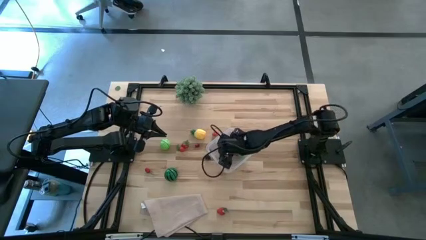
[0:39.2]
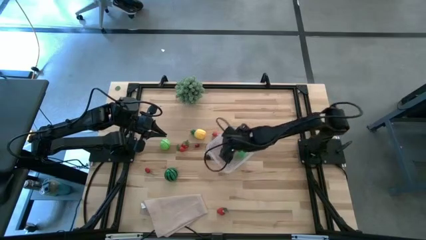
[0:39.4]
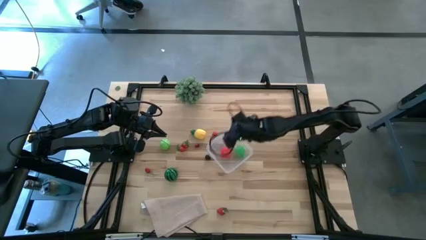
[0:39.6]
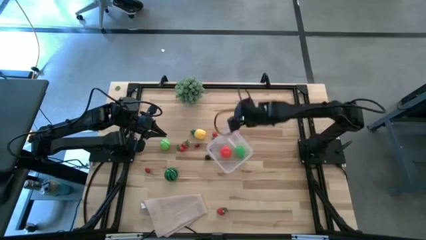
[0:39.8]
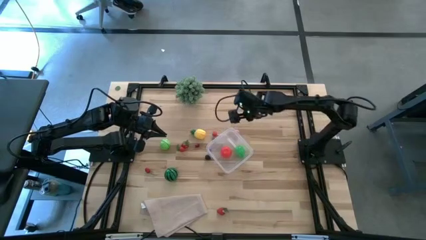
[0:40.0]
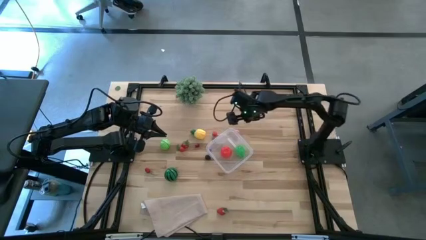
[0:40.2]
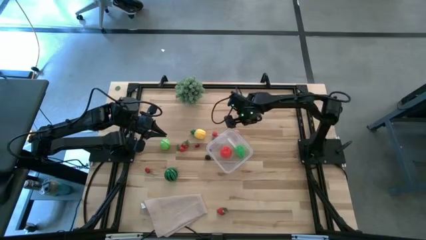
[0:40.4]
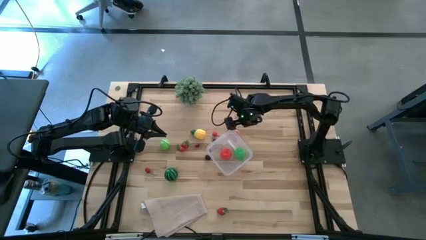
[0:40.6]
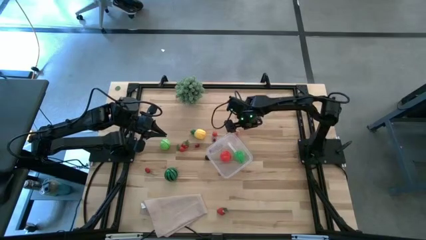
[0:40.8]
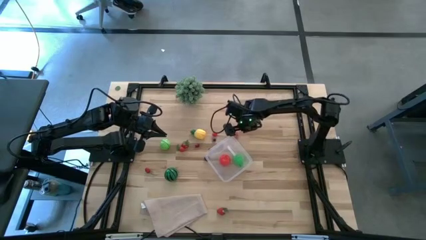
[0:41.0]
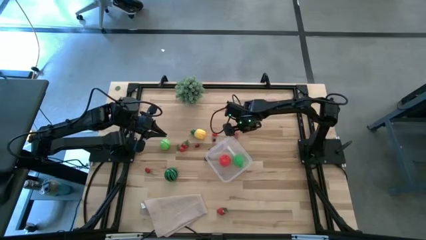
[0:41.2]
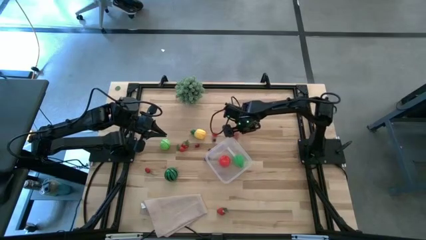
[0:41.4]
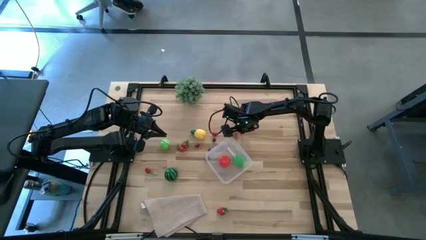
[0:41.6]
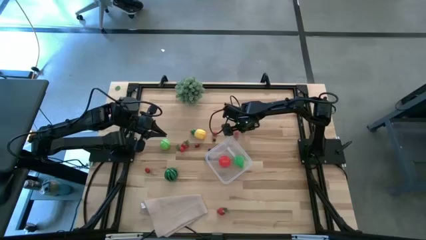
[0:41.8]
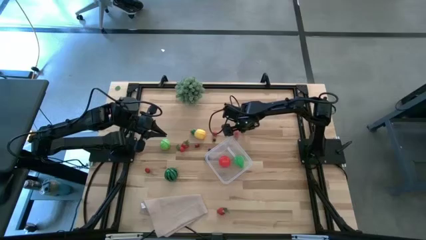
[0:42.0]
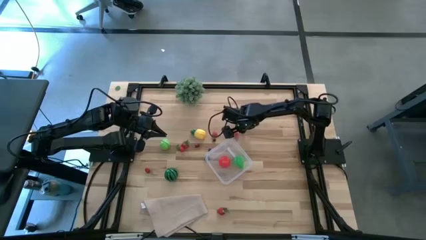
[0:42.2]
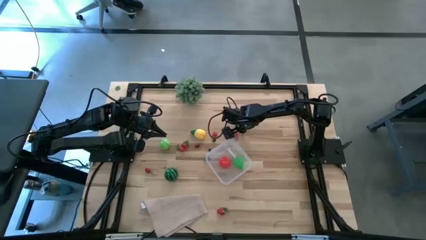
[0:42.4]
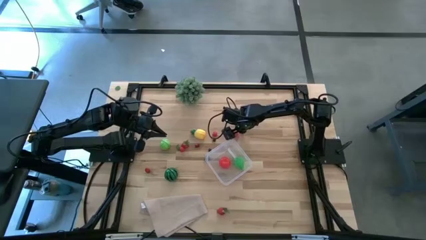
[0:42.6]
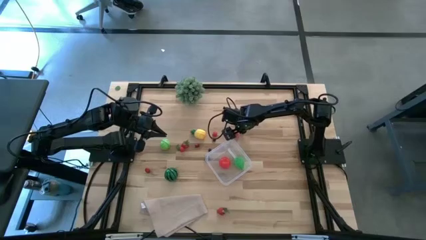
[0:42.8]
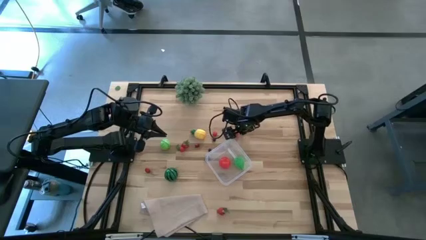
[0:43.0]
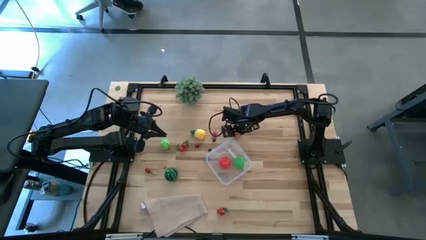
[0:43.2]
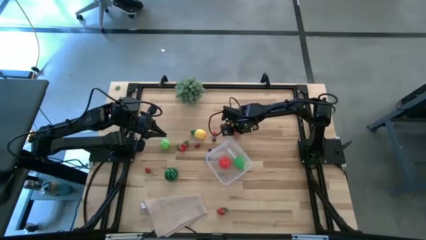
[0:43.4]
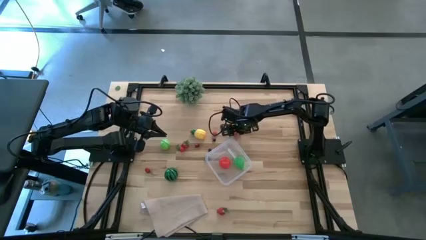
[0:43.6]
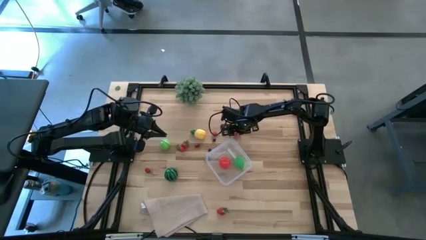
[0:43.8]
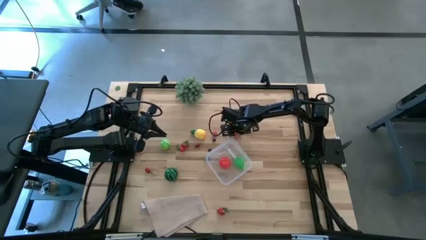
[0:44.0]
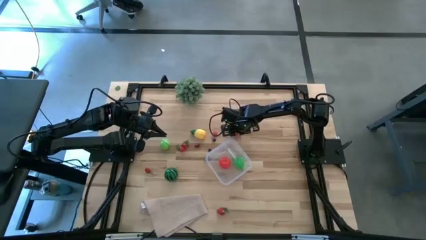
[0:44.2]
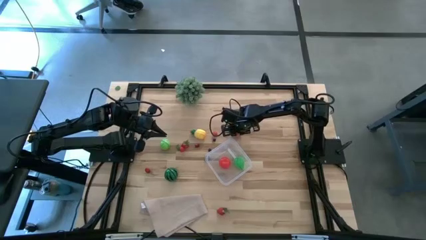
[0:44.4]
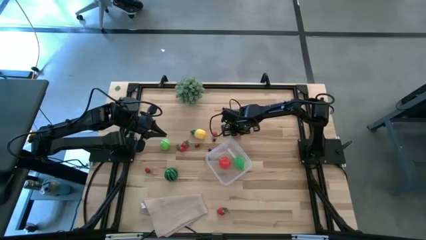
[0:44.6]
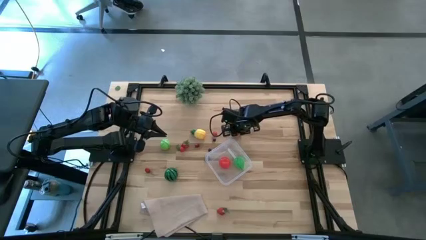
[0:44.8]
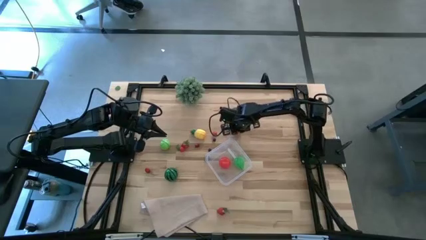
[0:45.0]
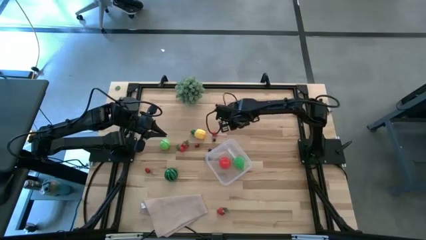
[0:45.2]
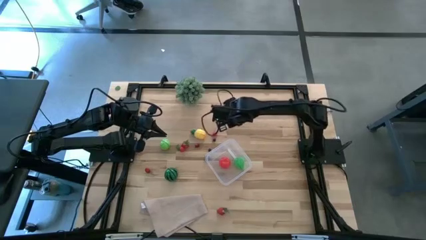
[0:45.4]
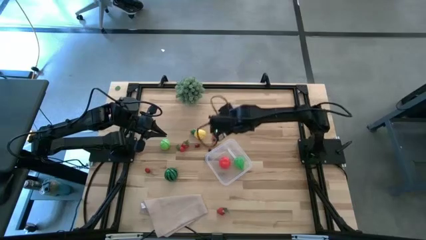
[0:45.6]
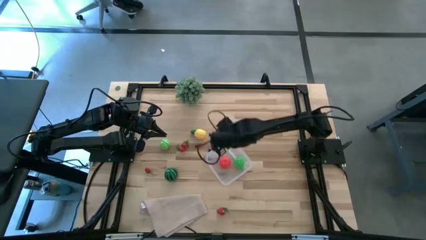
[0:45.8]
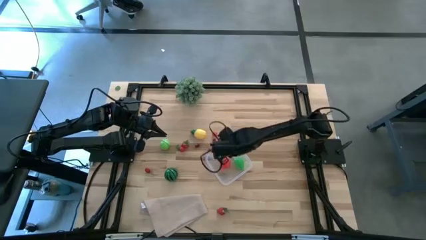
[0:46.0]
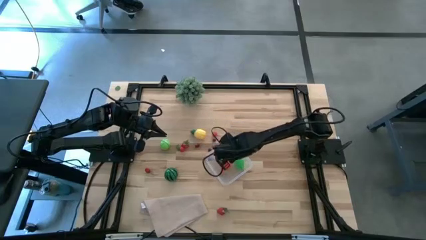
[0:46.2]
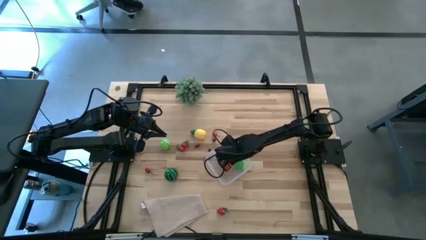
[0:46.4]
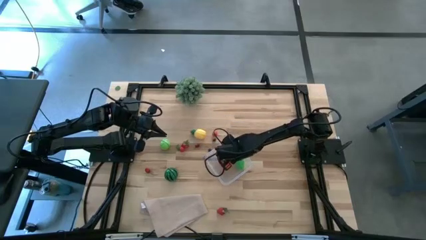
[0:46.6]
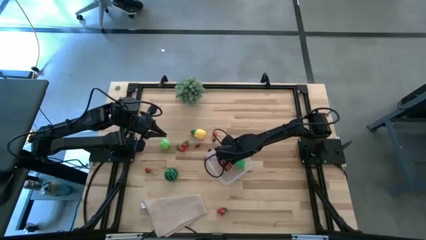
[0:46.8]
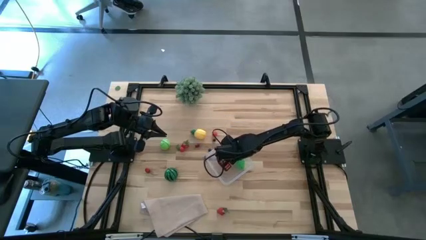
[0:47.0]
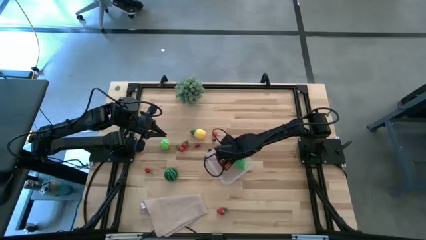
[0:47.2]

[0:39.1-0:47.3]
Task: Pick and placing Produce into tupperware
Put the peach into the transparent bin

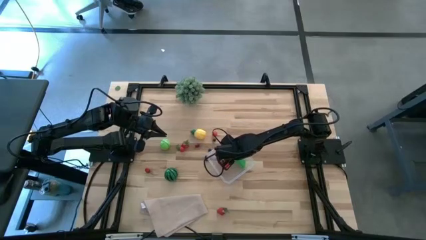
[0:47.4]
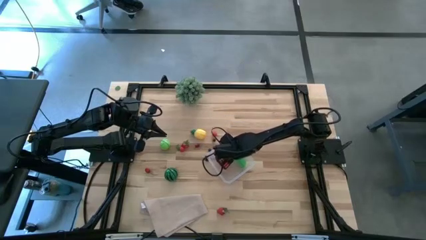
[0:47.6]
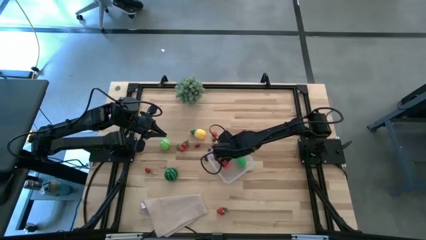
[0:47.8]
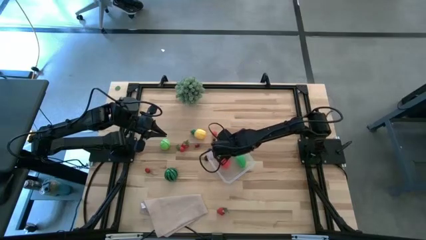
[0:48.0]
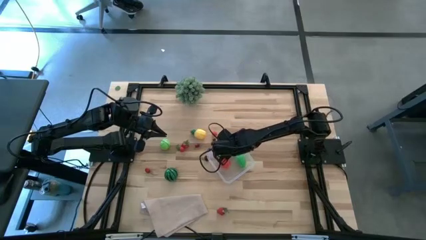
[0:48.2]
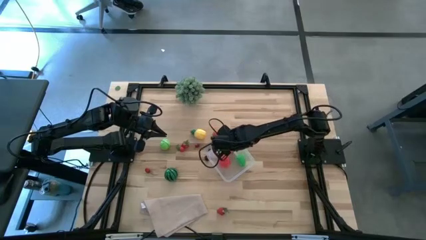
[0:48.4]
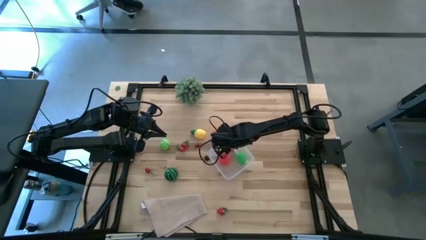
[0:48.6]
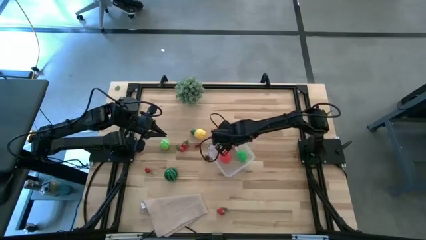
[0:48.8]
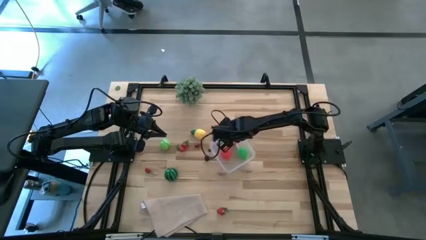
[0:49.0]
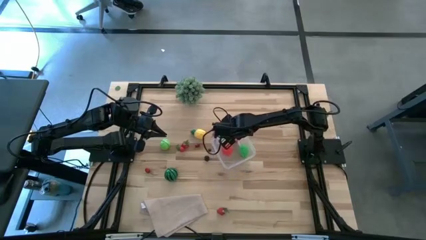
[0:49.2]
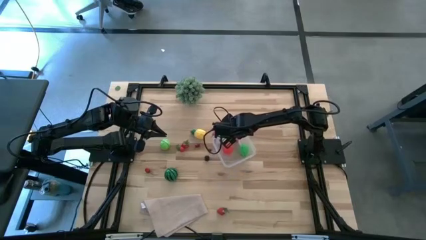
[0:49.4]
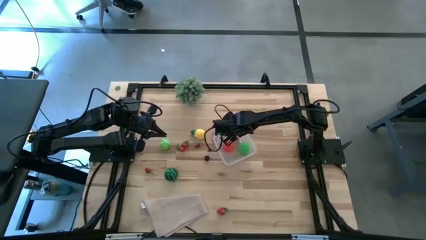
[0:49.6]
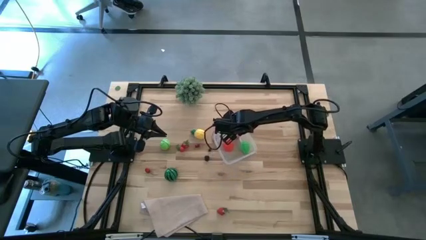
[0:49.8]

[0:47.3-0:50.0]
Adjust the transparent bin

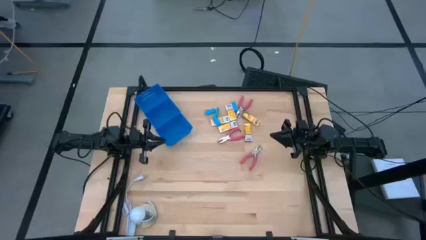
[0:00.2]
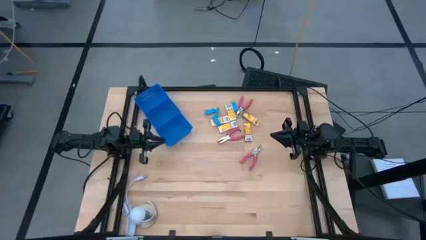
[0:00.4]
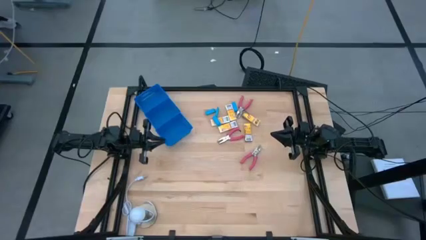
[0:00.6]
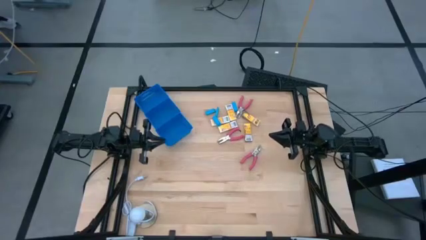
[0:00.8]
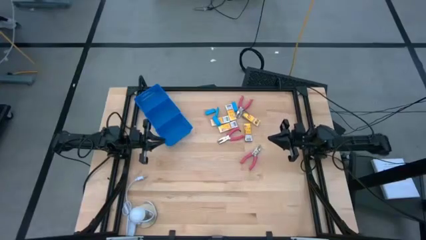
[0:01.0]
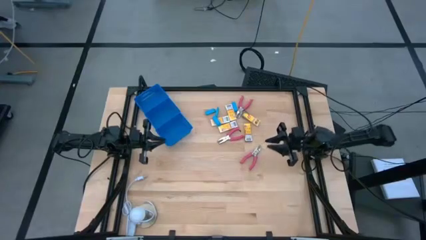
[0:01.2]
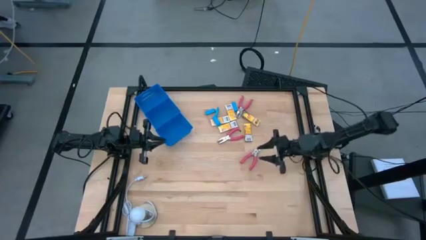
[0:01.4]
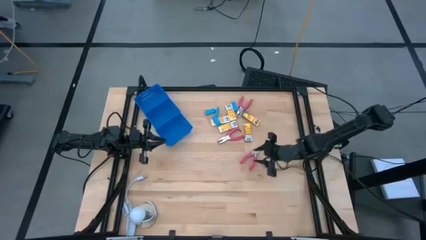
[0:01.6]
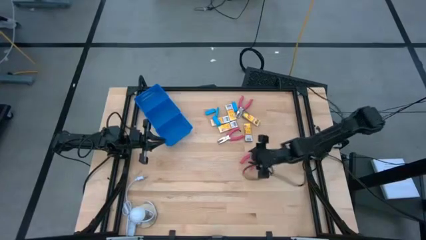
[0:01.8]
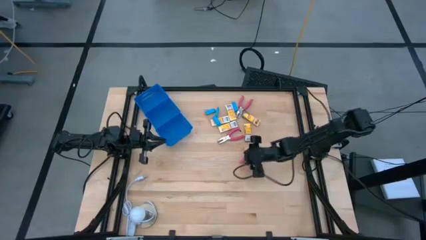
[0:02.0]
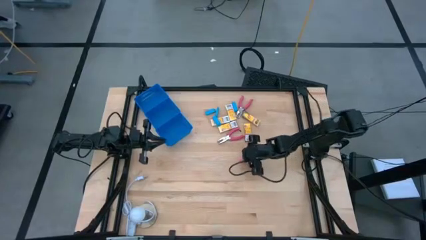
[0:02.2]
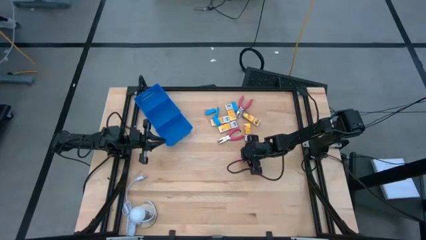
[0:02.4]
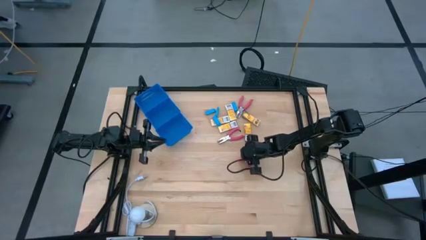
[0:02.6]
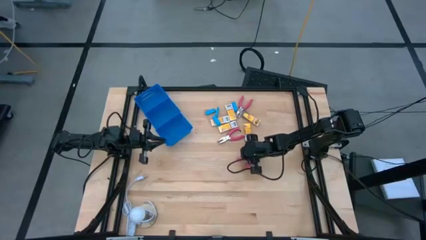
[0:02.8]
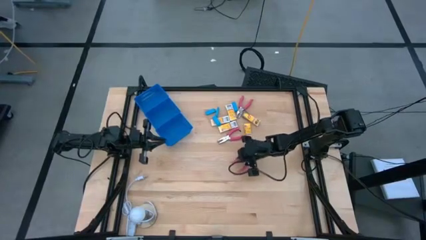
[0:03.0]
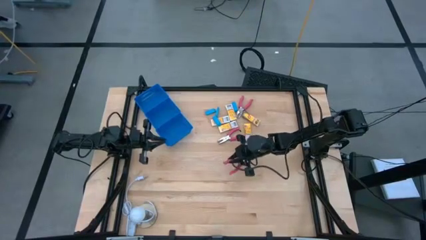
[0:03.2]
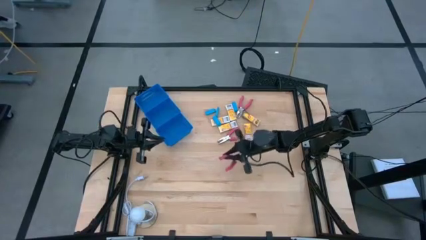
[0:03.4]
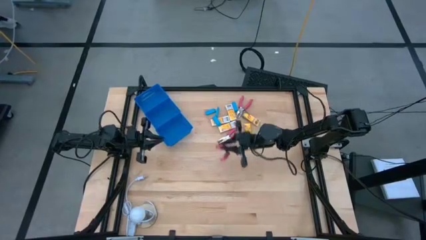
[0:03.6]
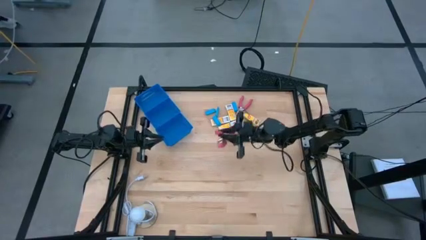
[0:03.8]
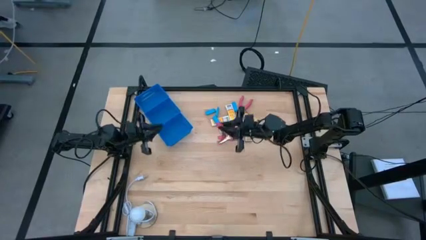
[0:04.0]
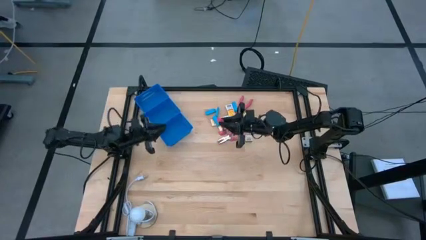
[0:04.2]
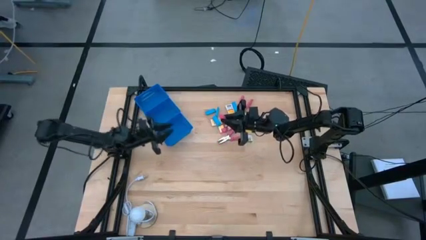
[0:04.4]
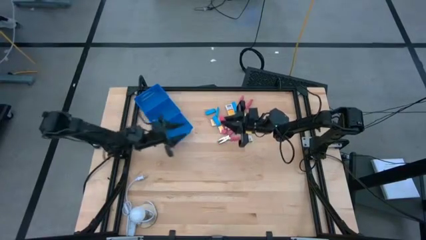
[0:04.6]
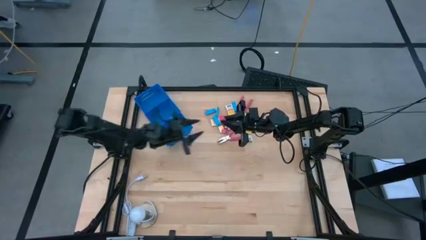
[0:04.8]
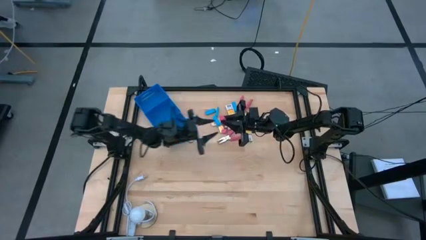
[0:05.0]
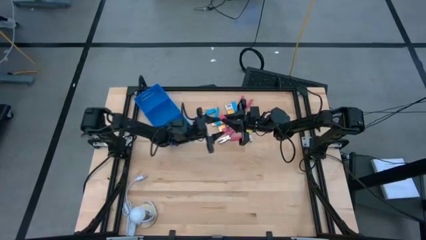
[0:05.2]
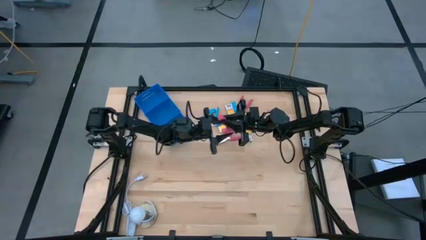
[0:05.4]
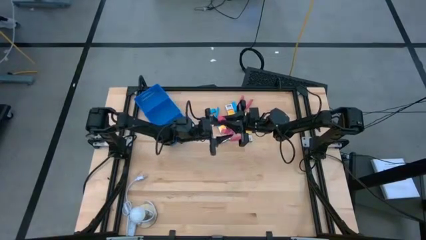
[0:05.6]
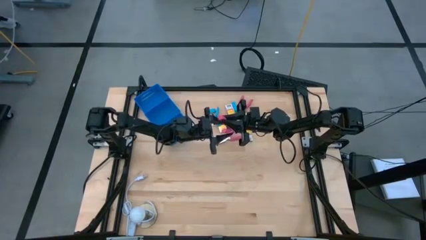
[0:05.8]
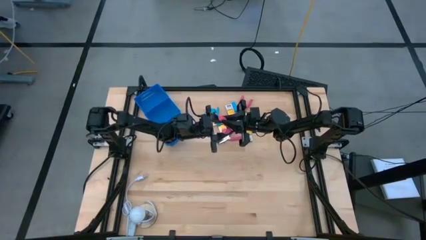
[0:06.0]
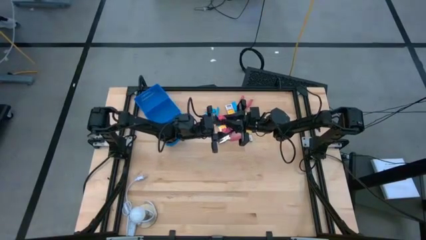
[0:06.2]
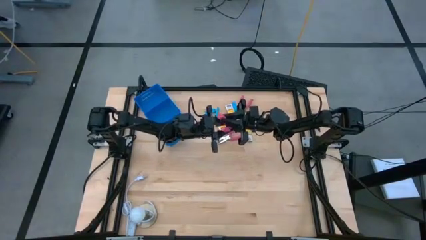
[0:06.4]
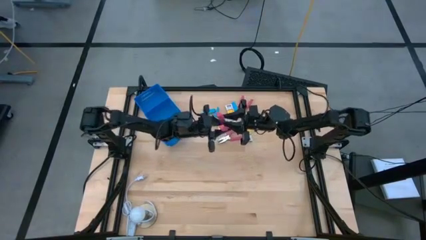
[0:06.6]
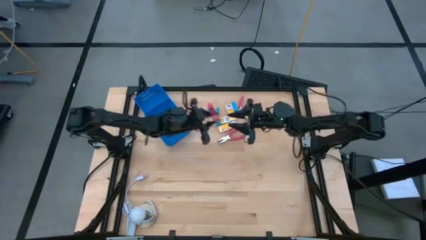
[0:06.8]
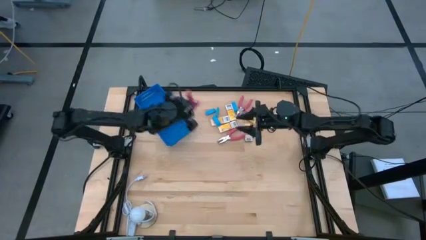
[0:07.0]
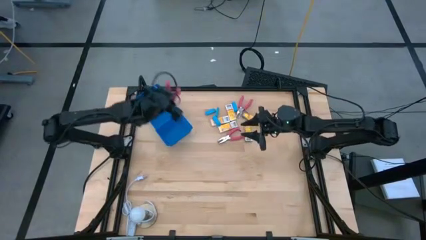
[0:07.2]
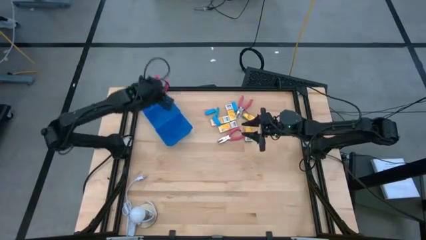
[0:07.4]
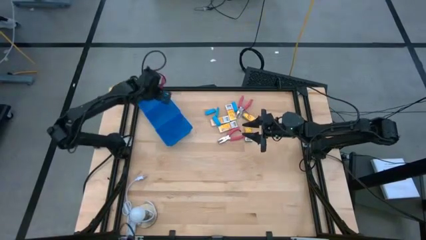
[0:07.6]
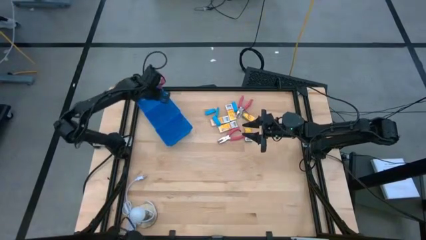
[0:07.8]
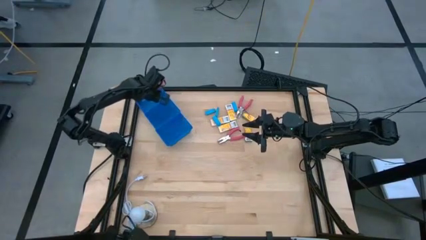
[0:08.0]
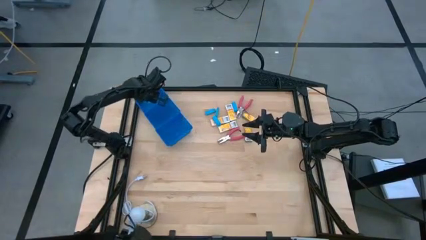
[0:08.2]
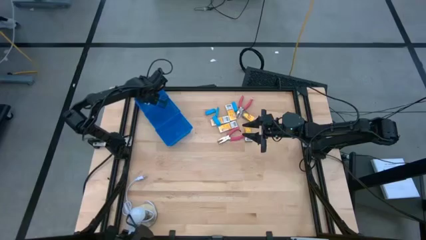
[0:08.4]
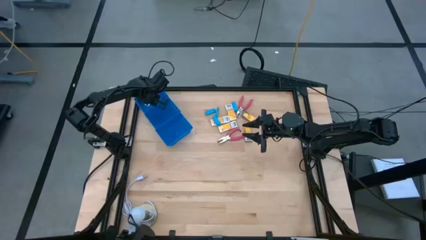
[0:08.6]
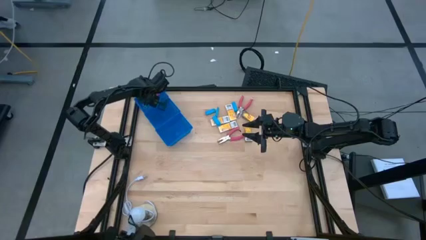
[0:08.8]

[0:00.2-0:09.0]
Task: Pick & Place School Supplies
Put the pink hole puncher into the top blue bin
